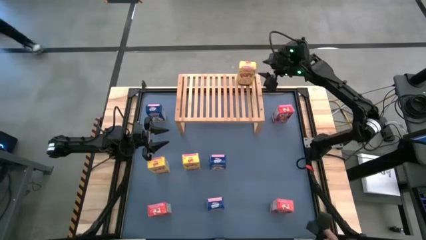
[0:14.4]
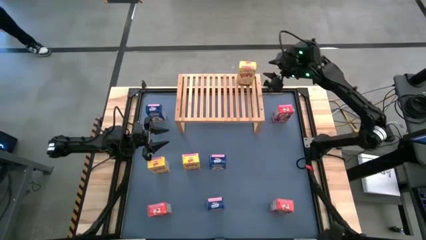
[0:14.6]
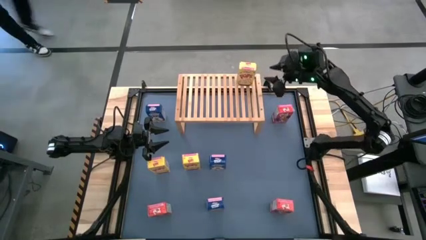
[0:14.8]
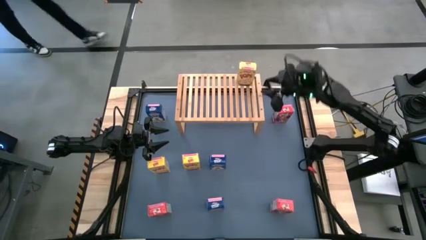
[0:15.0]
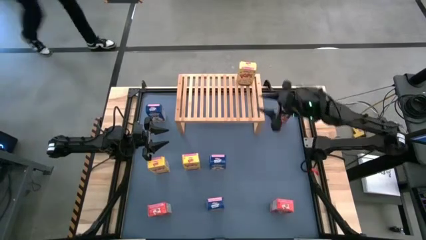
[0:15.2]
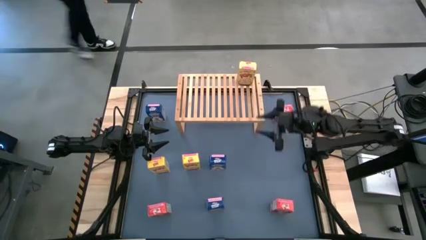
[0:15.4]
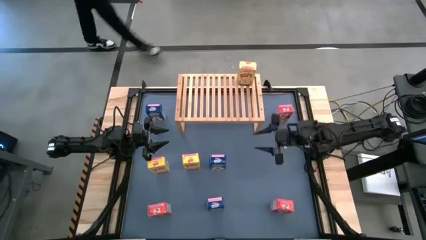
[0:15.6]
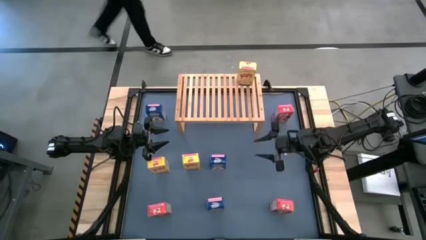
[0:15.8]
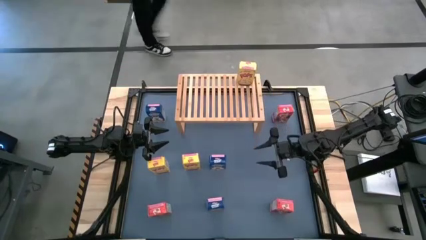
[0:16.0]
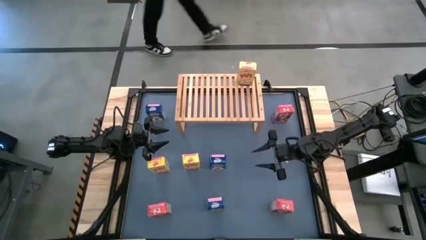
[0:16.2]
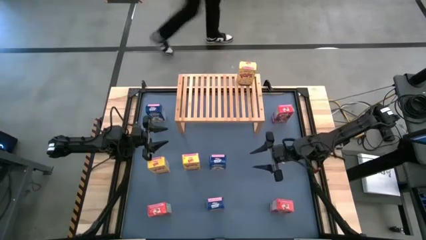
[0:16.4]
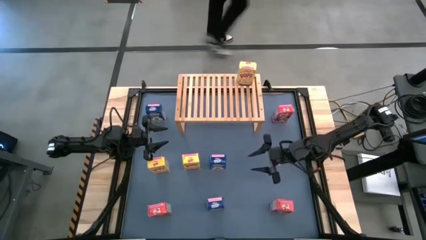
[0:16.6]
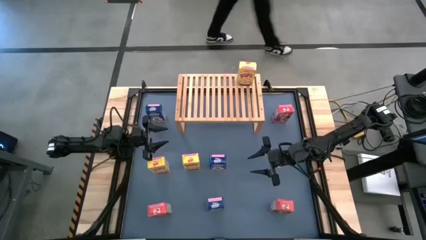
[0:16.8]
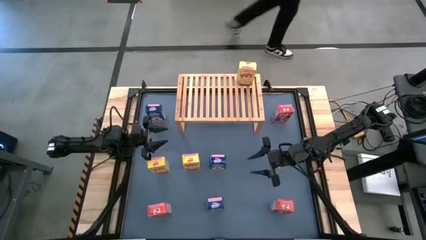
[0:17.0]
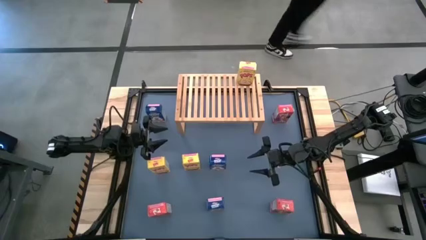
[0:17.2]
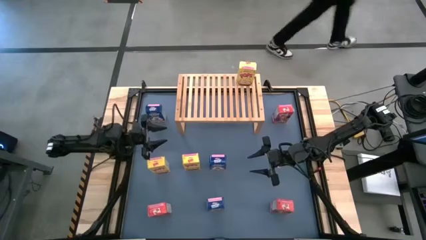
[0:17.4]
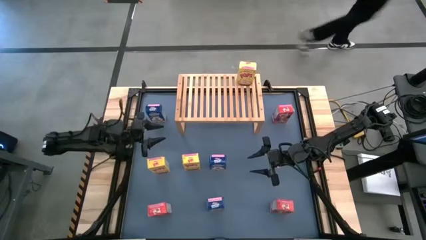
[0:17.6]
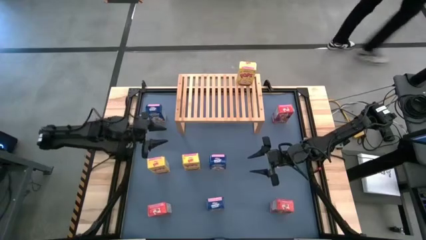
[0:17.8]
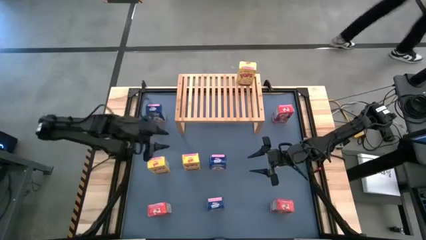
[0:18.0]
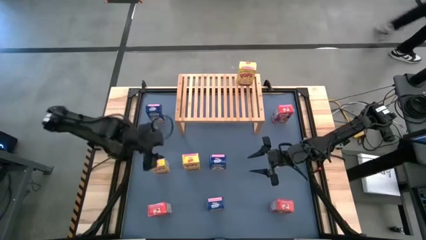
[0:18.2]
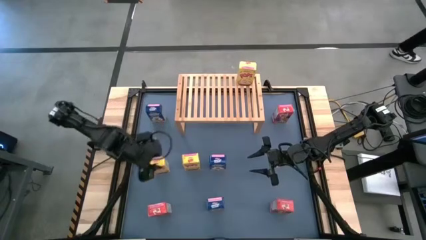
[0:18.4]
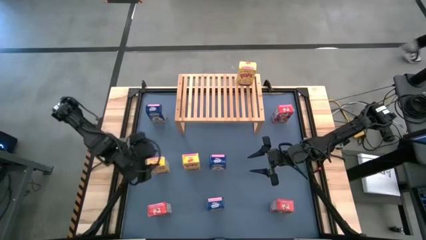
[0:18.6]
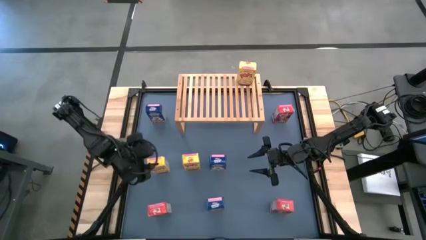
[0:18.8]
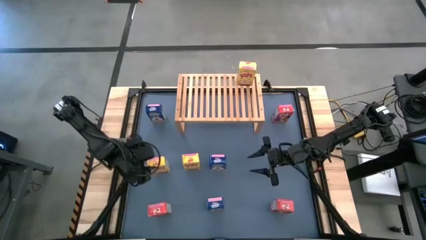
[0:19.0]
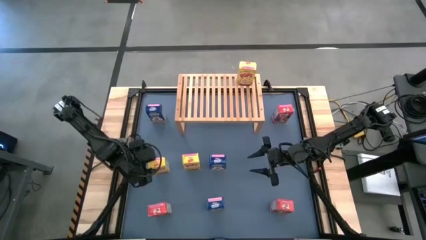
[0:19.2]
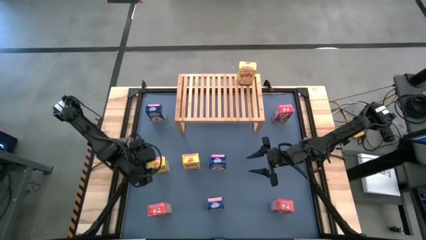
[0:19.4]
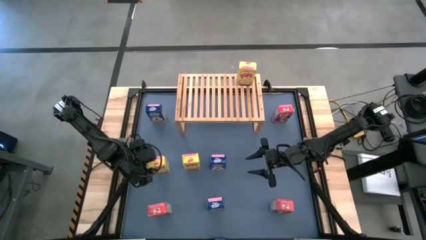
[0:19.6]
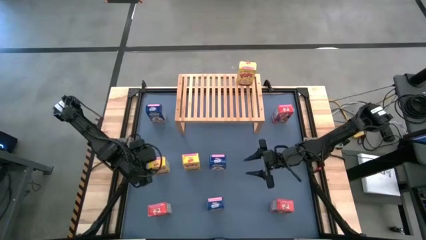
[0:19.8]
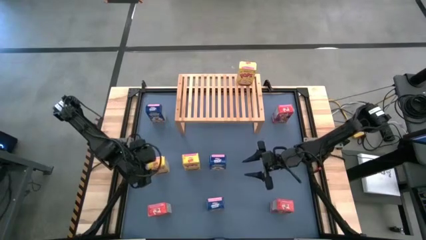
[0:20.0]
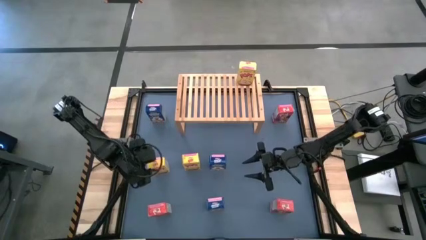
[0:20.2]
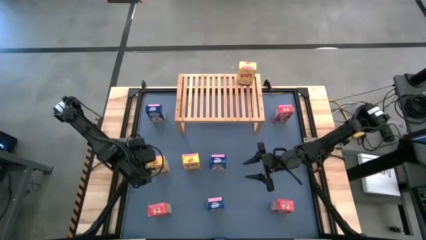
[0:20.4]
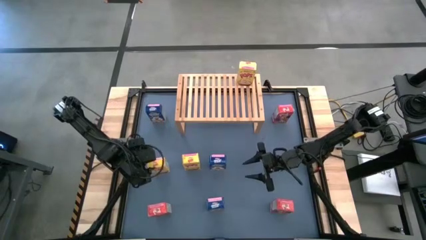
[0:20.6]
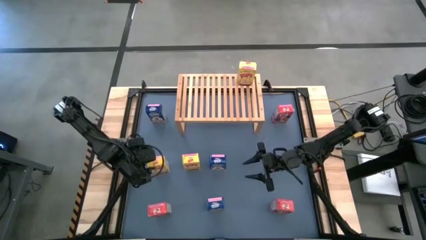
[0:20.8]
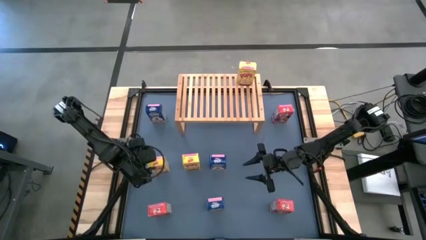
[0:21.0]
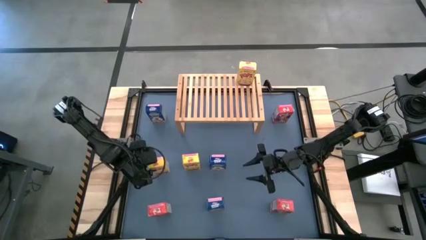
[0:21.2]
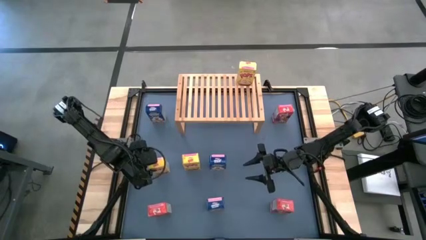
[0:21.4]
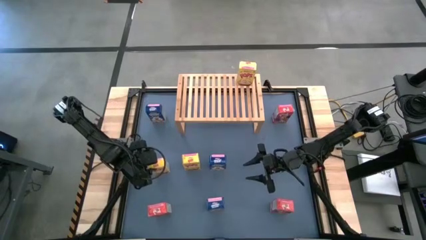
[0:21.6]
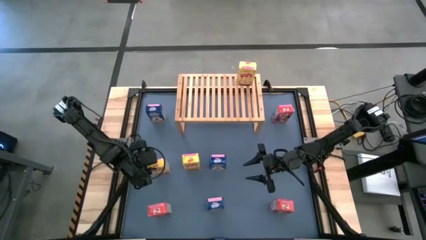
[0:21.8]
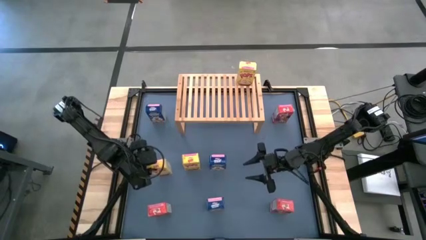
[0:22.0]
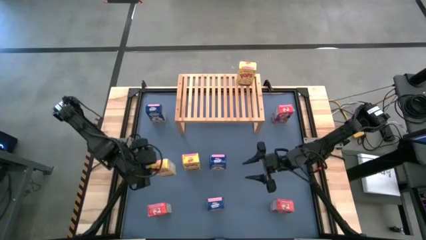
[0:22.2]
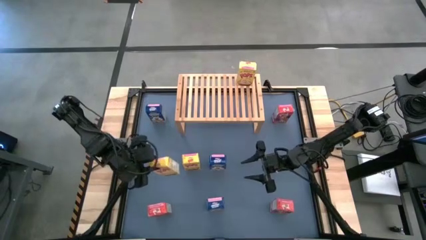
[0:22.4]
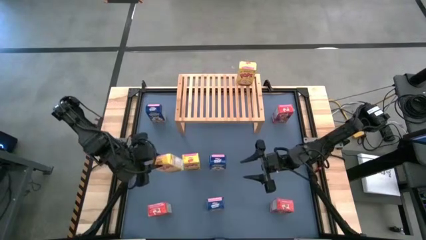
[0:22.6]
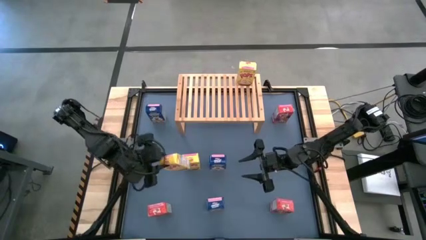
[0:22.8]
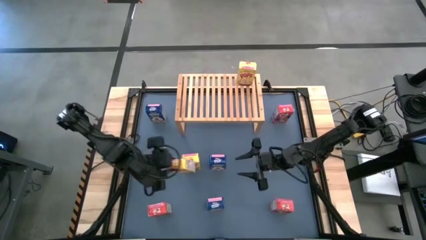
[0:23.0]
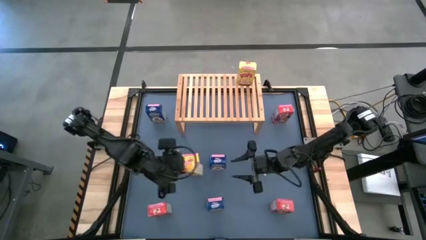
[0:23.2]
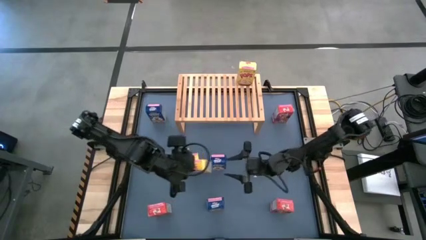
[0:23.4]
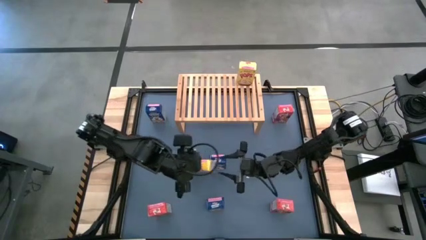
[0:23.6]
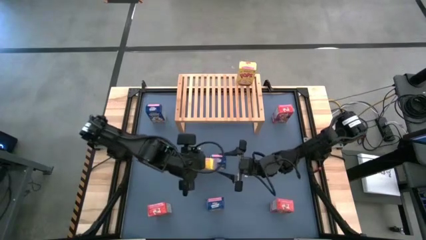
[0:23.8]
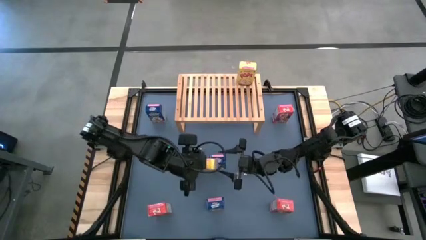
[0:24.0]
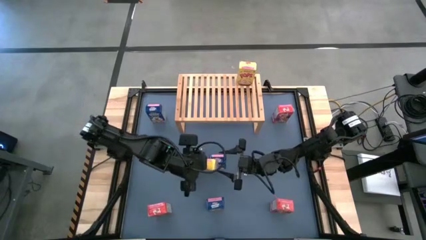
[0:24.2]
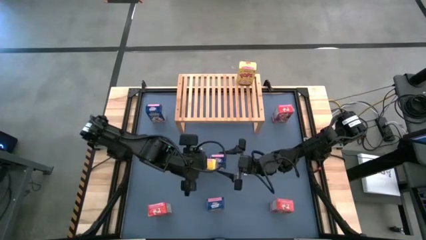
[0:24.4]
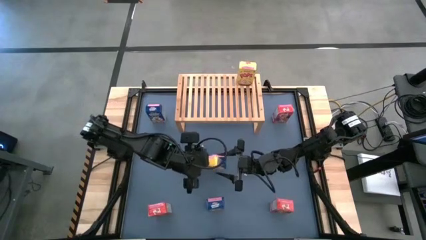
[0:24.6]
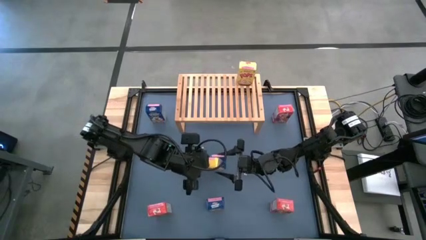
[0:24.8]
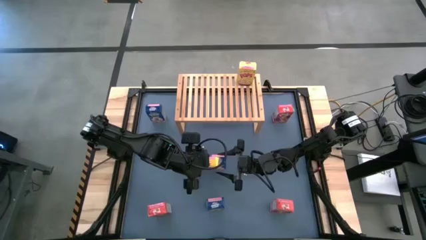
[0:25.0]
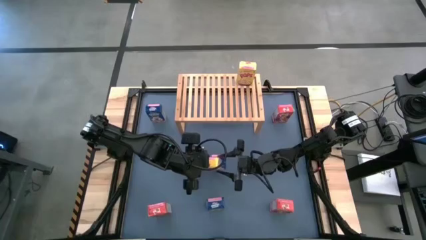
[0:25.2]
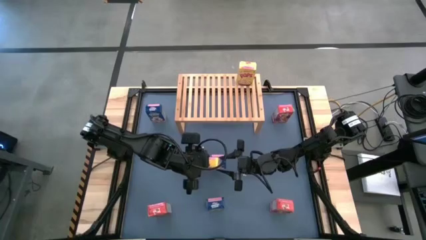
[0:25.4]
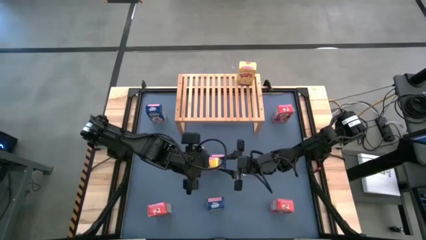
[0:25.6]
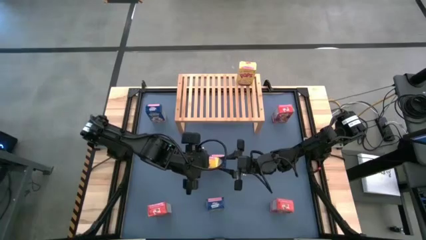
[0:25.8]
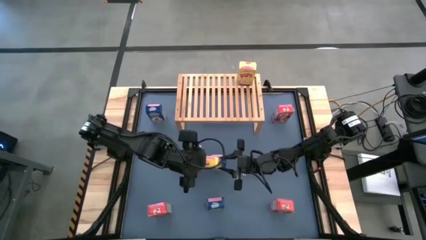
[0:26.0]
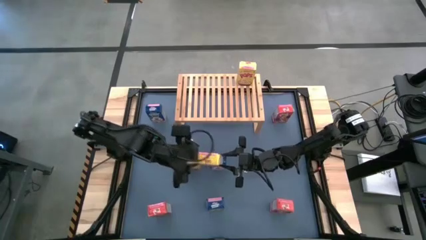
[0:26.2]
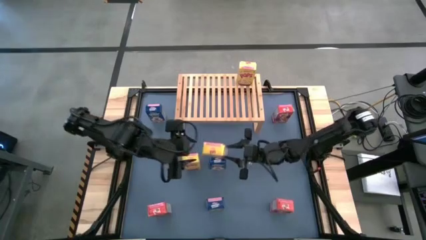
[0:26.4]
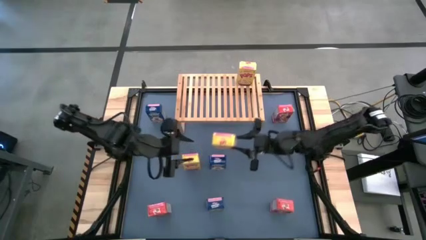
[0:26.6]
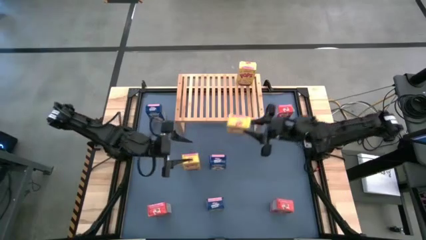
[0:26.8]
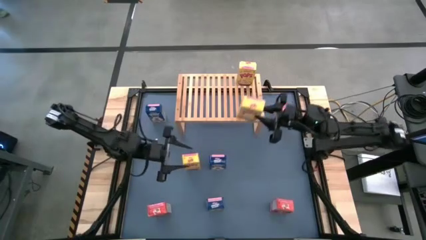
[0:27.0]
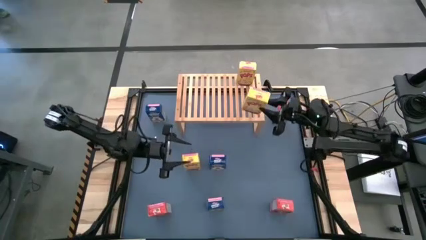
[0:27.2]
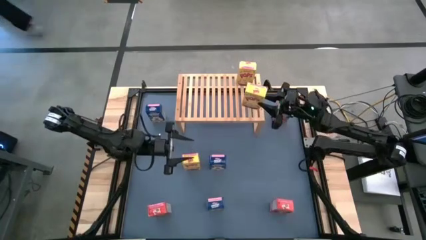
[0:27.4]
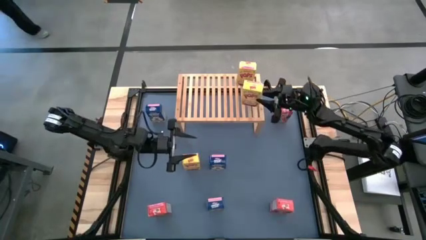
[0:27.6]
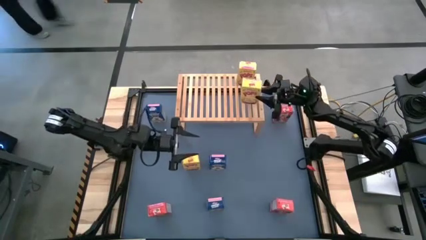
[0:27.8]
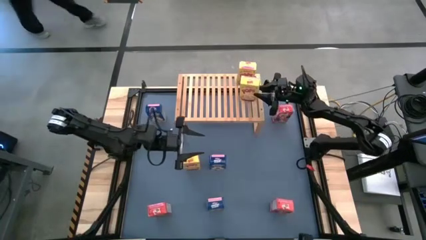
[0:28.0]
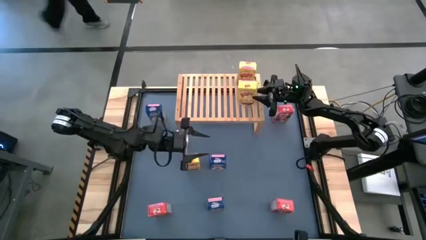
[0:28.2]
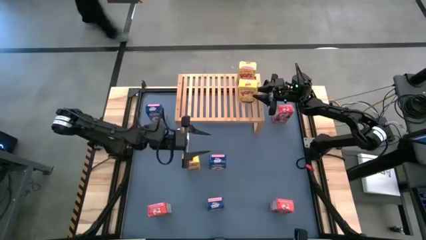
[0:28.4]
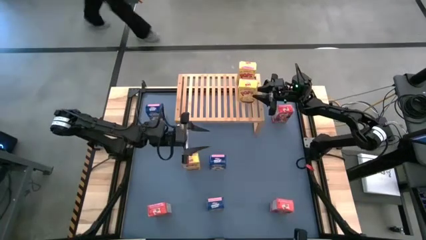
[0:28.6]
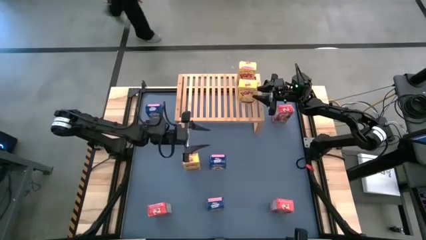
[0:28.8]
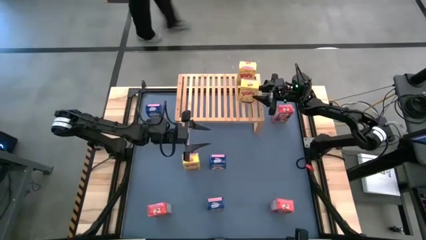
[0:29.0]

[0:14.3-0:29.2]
Task: Stack cereal on shelf
Put the left yellow cereal box on the shelf aligned with the other yellow cereal box
